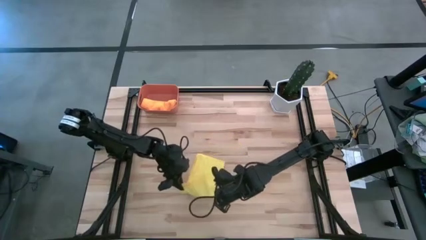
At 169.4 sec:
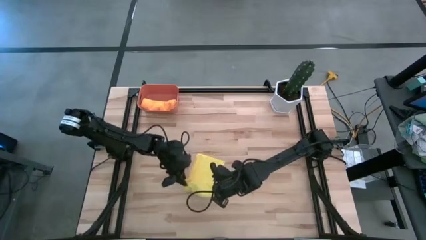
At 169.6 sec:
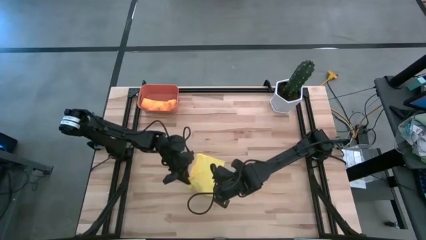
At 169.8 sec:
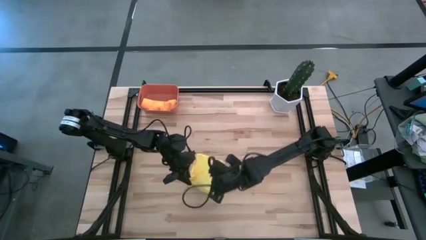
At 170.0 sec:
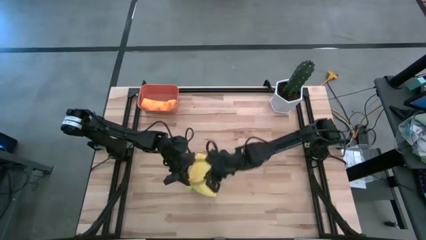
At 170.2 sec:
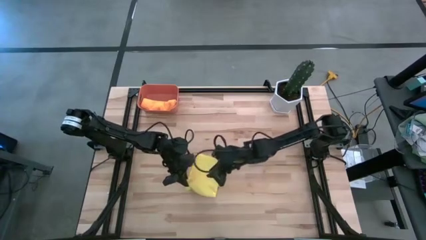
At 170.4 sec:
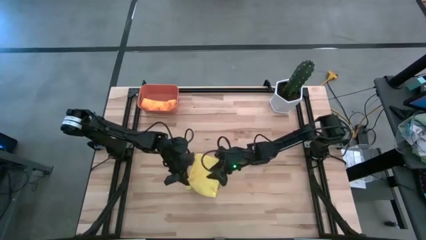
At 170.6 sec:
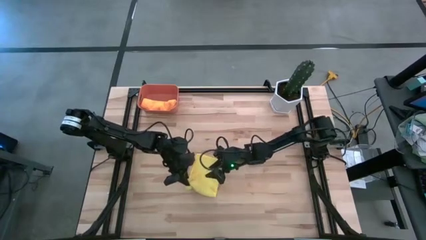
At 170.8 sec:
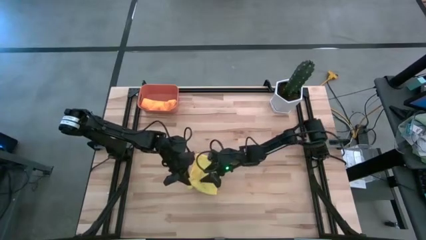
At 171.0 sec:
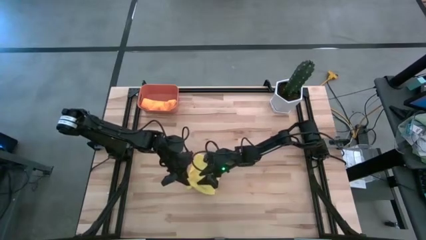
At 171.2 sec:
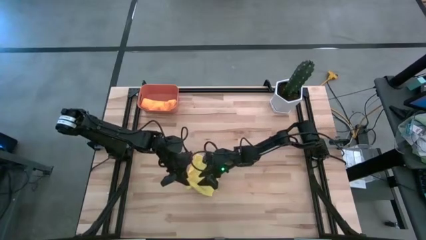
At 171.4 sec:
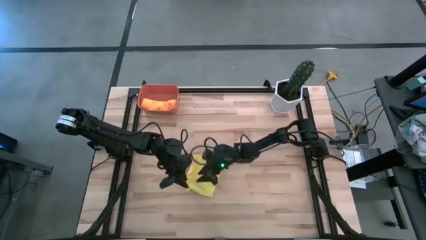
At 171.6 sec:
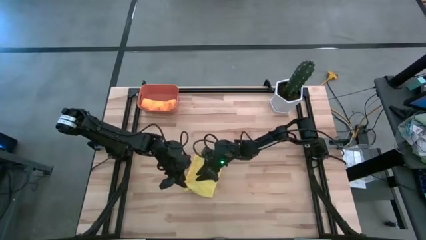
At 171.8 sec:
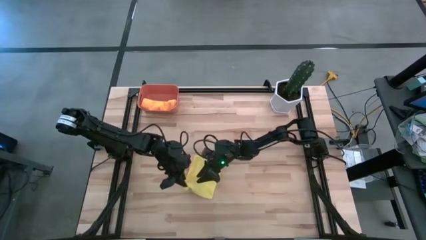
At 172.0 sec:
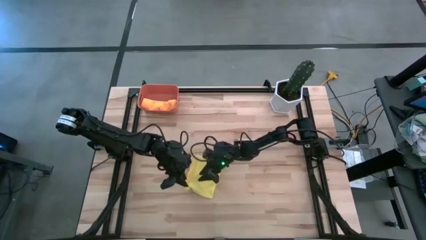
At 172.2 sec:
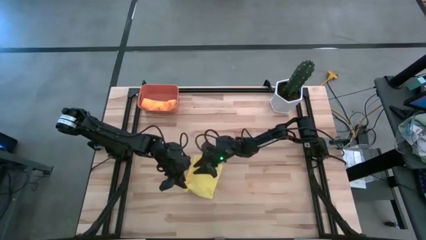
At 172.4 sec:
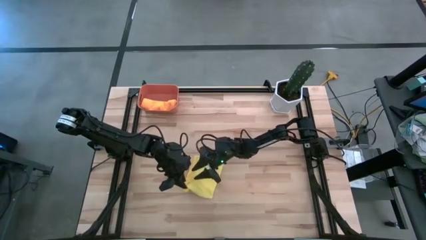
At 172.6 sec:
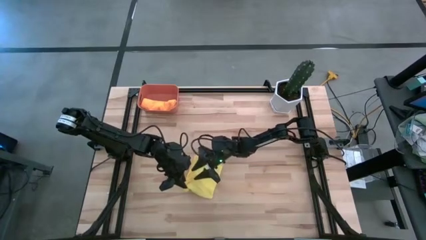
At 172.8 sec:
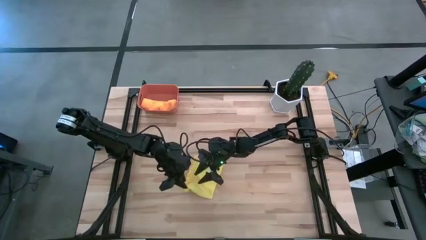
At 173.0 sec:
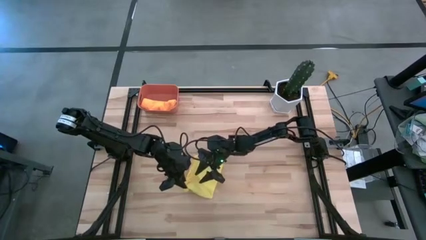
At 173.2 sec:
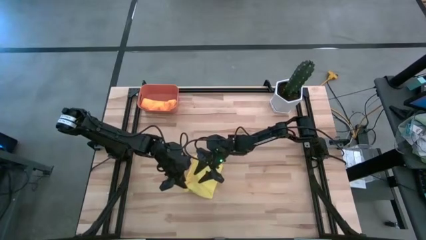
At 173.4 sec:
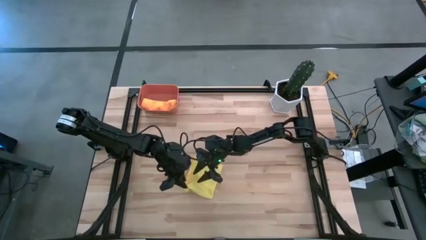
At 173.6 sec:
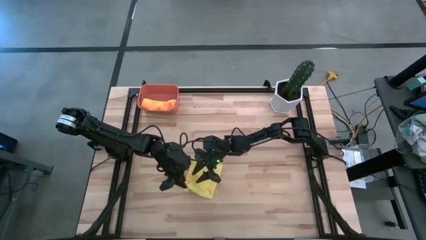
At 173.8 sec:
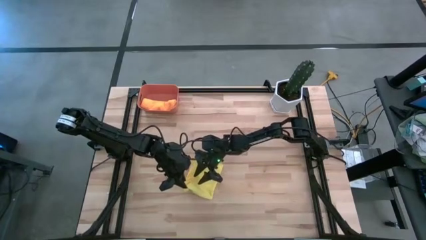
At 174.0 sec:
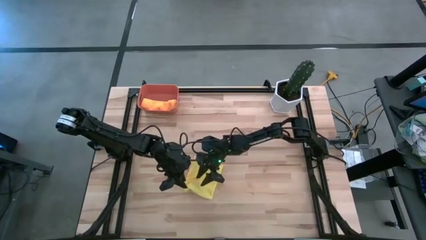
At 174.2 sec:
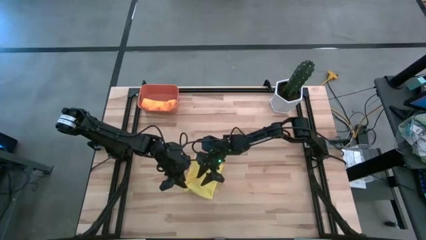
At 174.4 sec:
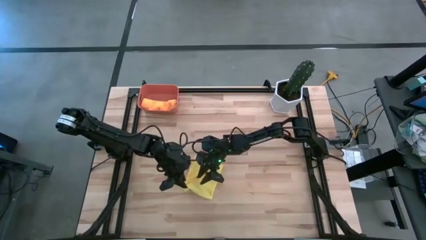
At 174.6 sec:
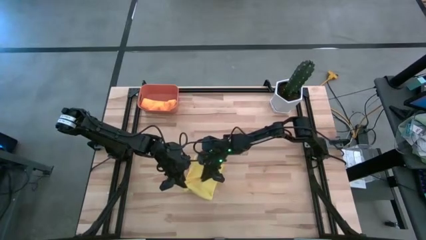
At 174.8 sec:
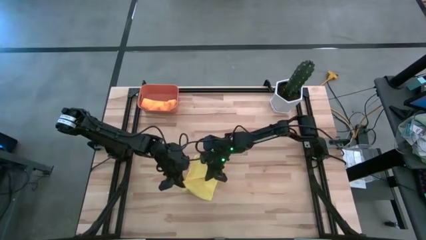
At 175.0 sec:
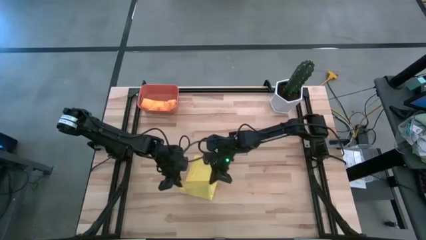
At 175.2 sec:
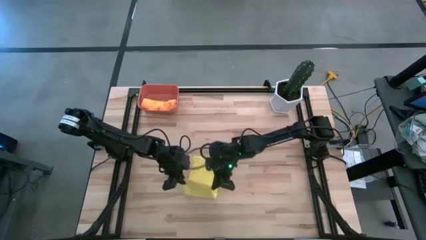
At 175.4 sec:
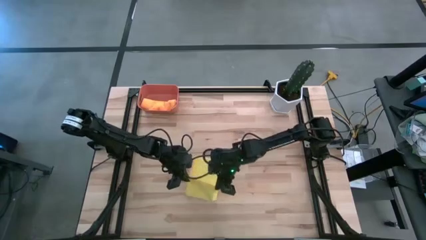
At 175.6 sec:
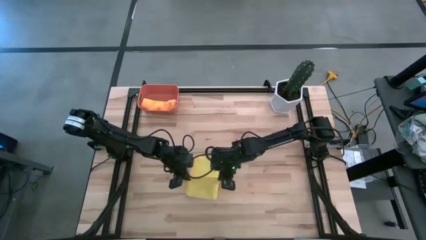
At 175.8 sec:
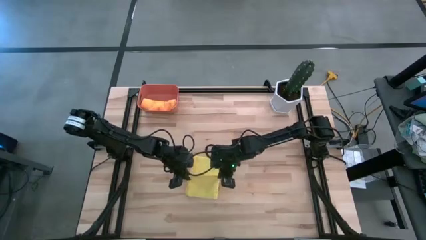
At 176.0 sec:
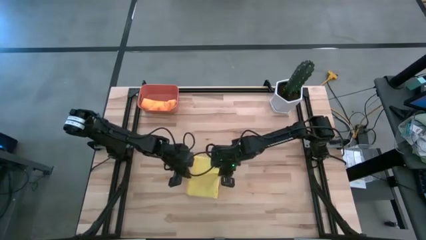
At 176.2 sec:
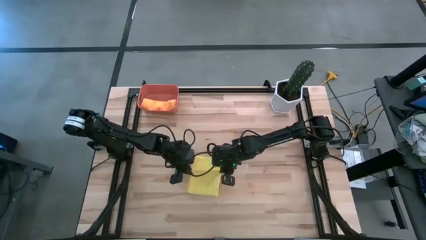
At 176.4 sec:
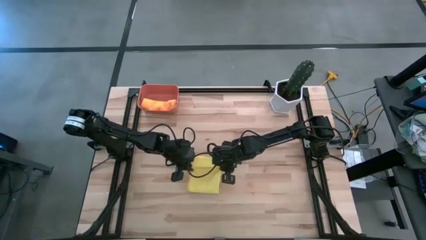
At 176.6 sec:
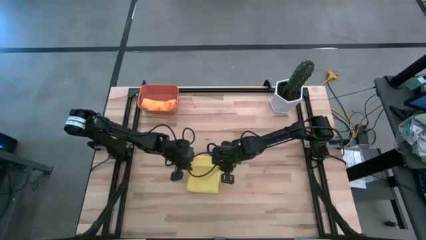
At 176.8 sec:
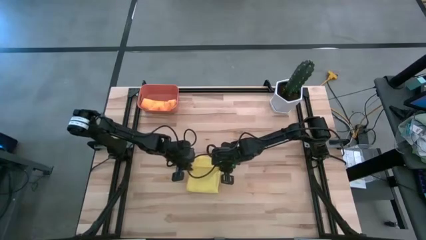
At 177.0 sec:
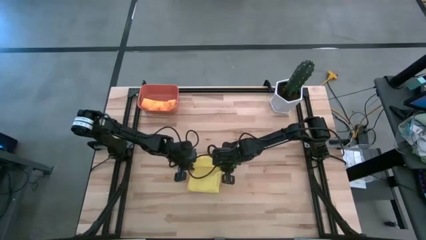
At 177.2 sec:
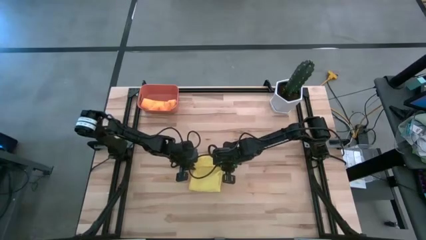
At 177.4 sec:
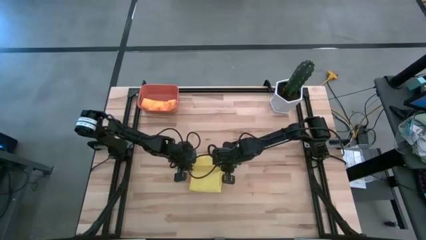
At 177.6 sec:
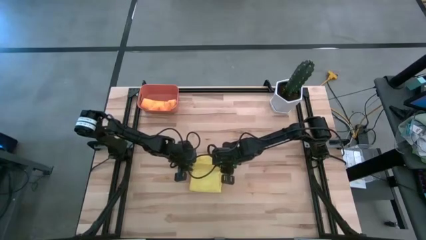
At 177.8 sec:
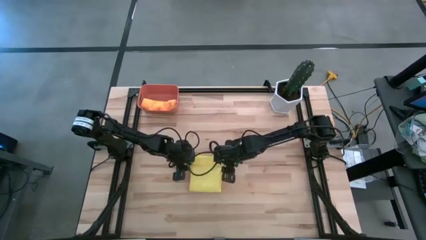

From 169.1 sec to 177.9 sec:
Task: Roll microfiber towels into tight, uniform cylinder then place into a basket
Roll the yellow towel

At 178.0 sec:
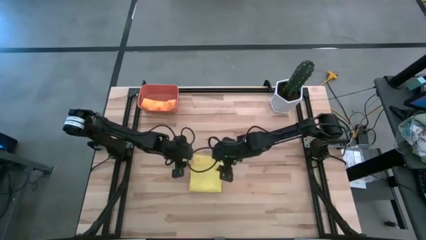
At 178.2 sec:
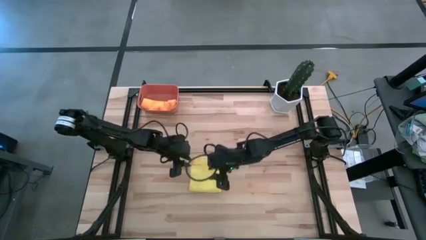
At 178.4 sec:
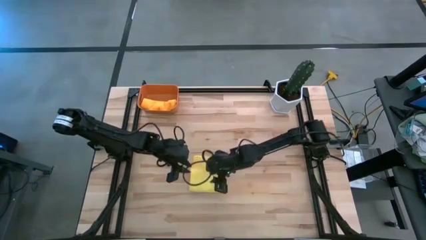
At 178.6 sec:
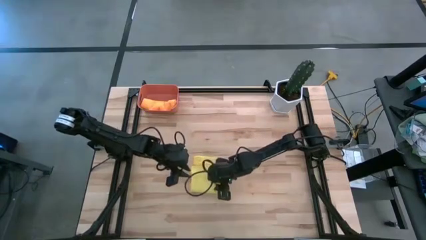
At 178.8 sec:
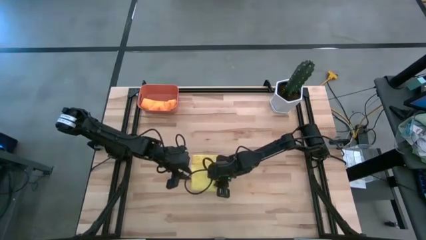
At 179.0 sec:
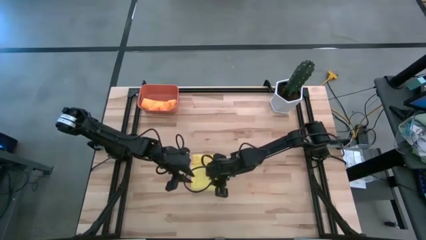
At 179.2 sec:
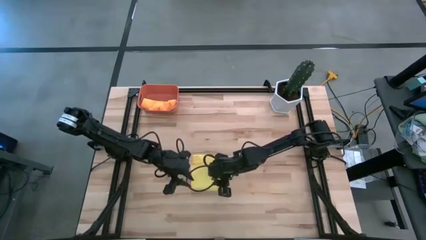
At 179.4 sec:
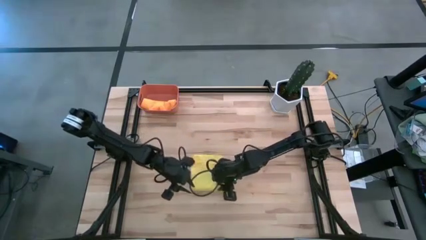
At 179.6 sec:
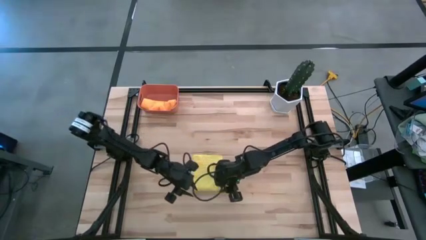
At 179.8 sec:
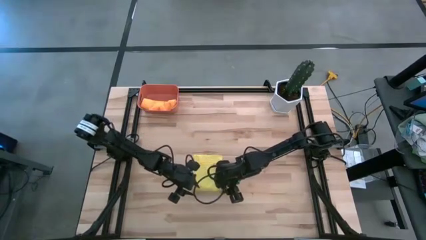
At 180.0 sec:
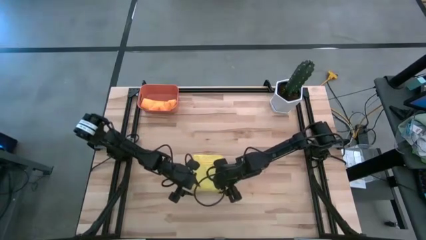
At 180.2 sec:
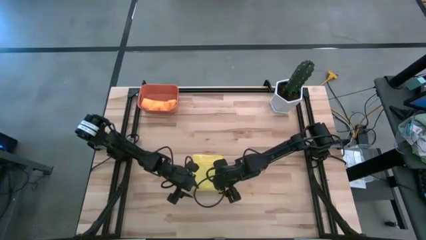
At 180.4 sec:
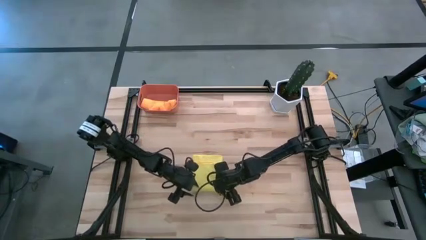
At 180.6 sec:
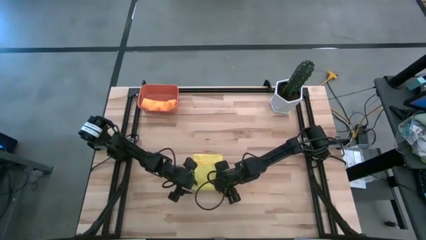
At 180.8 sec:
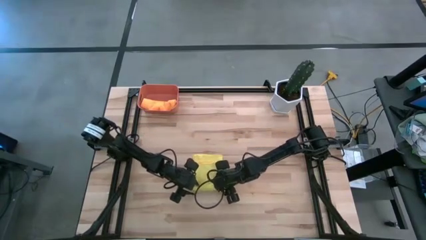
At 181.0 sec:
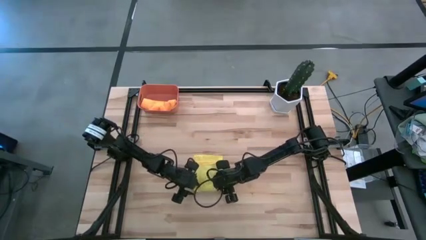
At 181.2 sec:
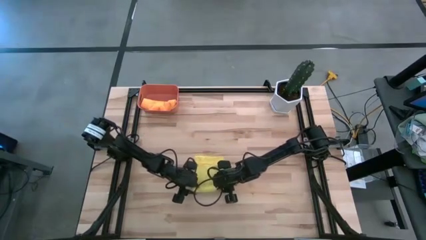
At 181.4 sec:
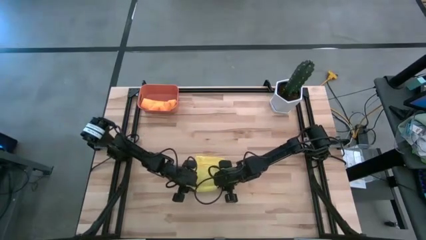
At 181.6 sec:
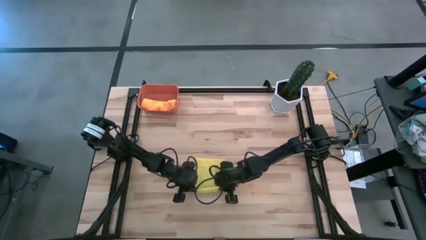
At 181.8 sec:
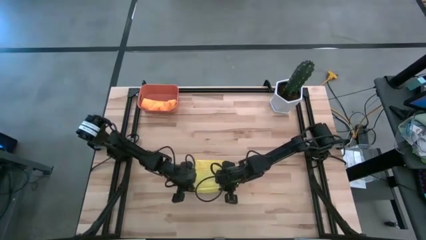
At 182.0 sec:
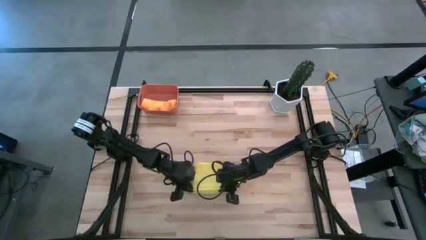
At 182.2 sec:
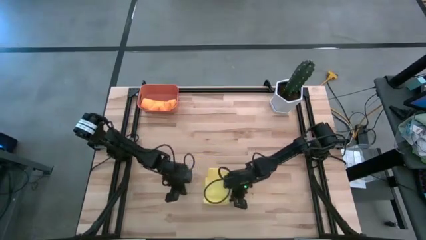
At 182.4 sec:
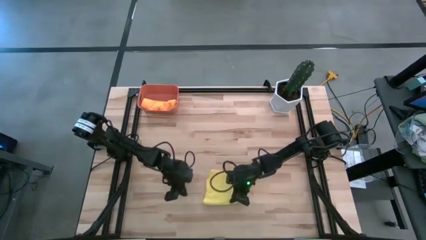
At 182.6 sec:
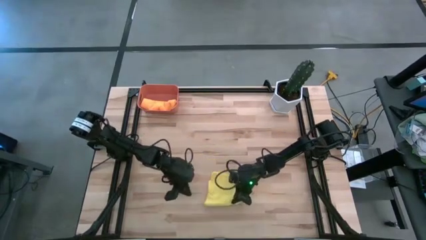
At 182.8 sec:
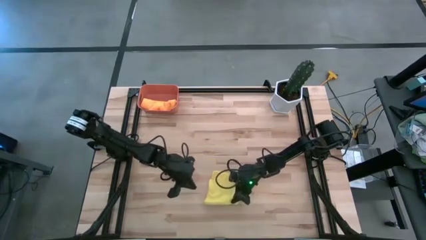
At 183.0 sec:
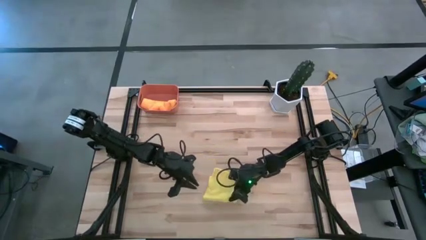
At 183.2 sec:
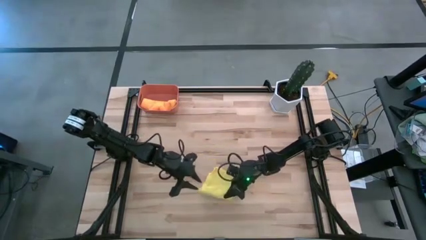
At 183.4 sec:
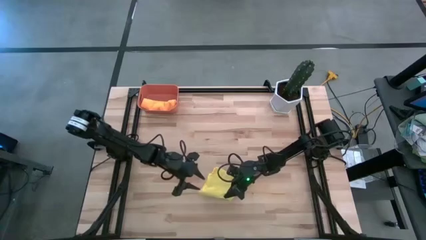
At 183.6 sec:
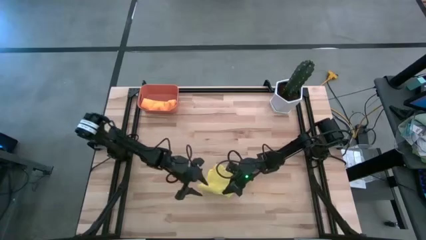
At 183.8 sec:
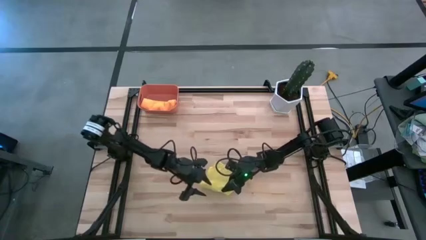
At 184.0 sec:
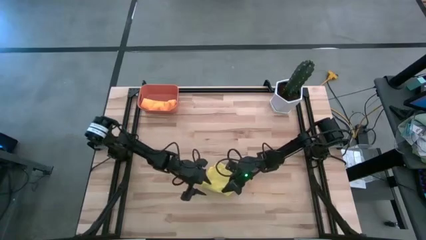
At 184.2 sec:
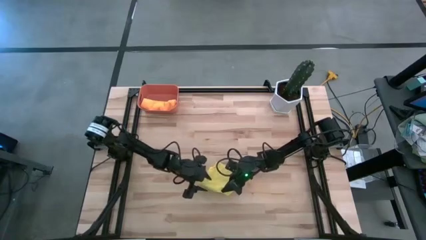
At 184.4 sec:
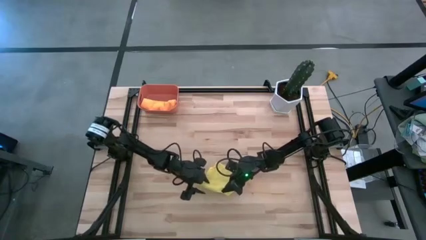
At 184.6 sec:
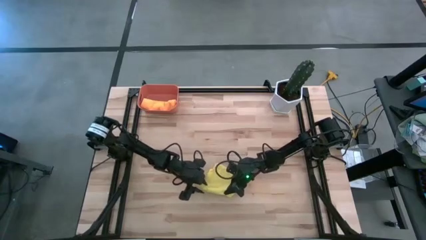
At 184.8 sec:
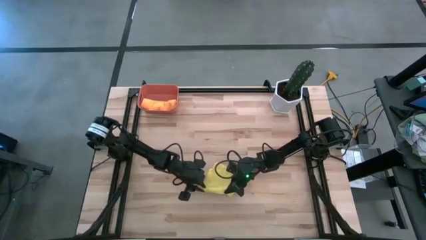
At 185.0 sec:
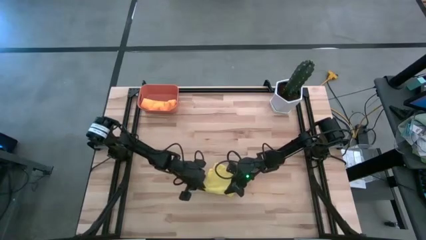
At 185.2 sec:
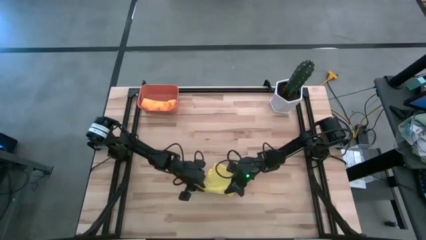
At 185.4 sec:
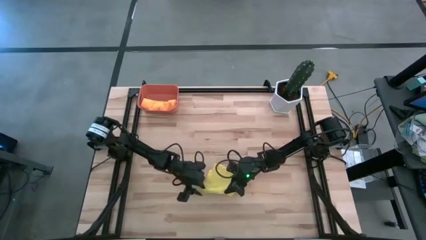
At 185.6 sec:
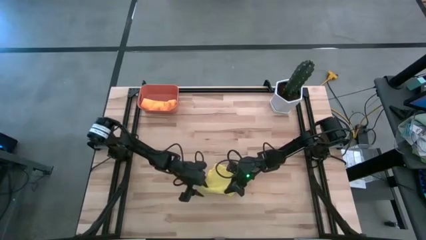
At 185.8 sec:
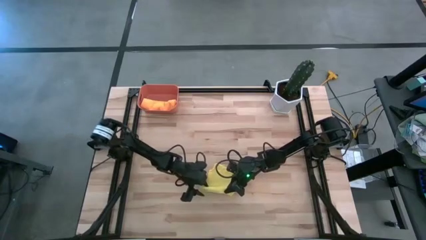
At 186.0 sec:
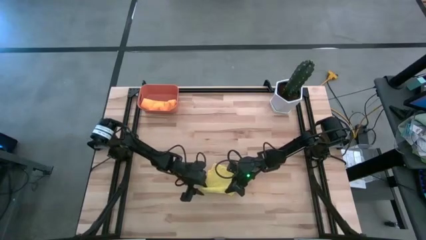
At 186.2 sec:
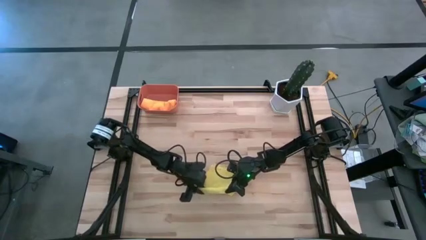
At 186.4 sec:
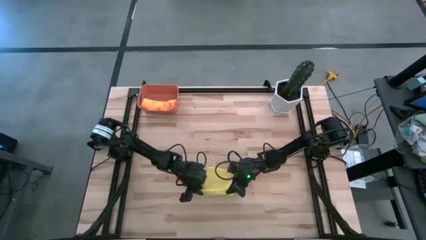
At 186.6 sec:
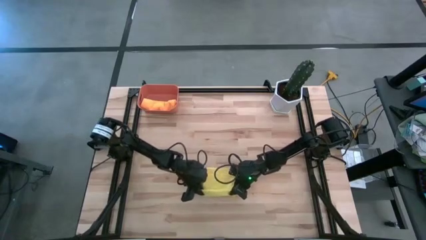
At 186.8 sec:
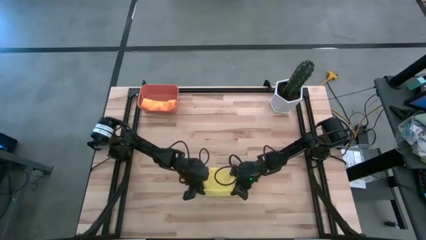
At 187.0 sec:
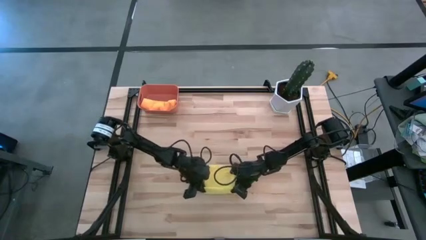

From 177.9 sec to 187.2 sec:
Roll the yellow towel
